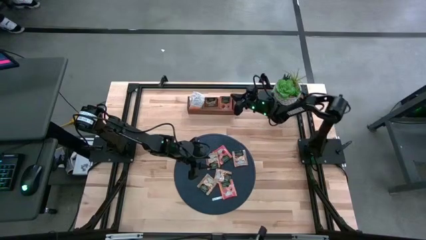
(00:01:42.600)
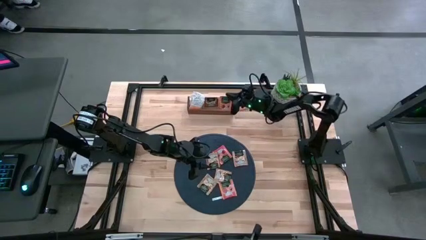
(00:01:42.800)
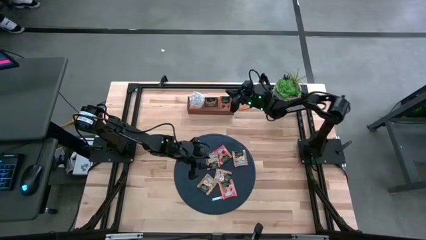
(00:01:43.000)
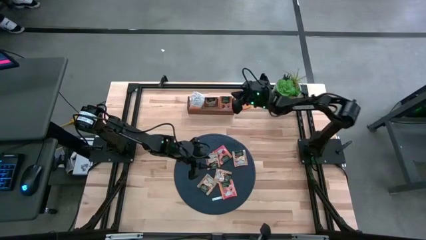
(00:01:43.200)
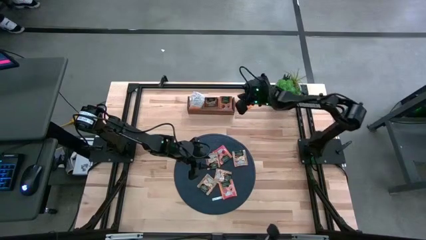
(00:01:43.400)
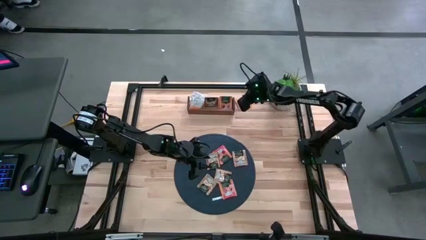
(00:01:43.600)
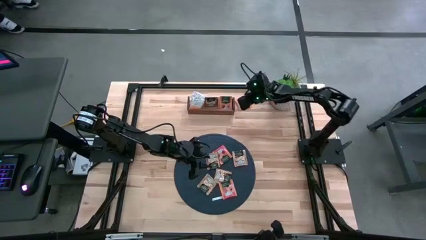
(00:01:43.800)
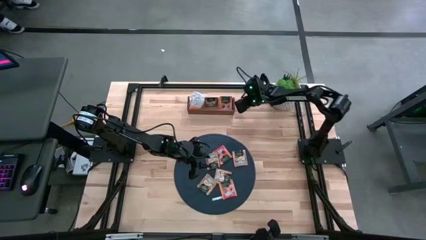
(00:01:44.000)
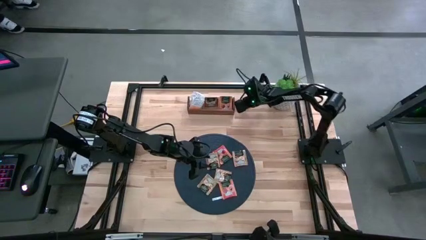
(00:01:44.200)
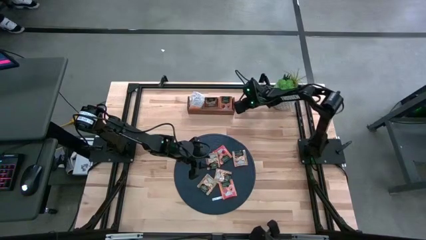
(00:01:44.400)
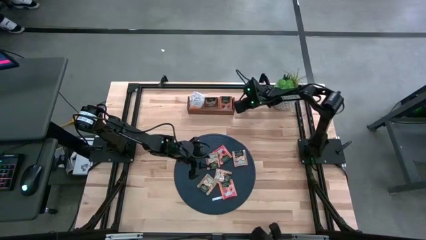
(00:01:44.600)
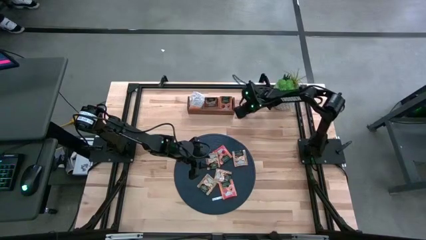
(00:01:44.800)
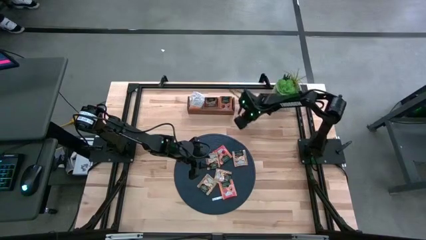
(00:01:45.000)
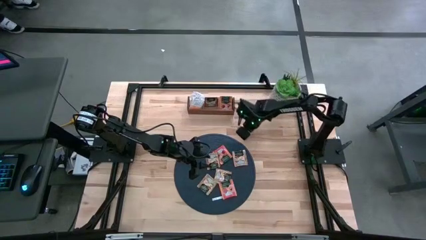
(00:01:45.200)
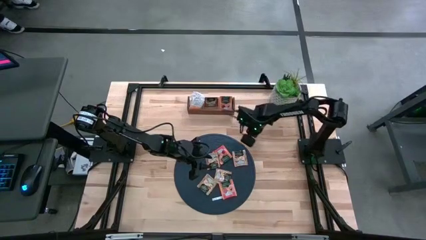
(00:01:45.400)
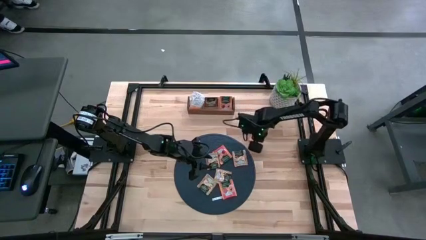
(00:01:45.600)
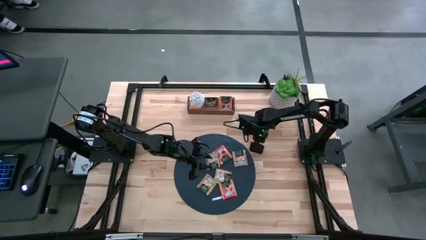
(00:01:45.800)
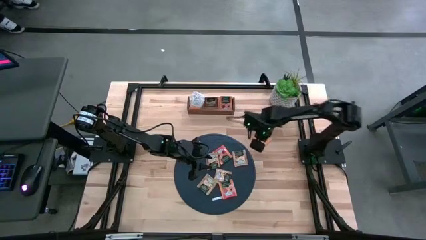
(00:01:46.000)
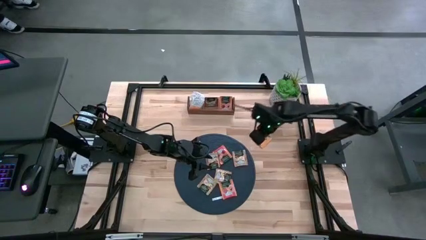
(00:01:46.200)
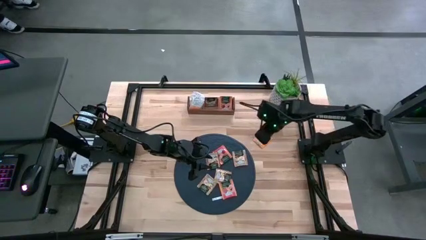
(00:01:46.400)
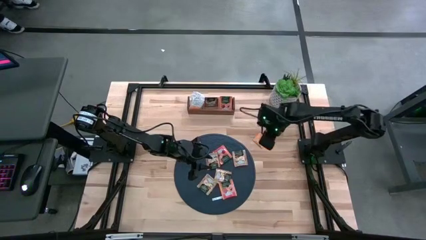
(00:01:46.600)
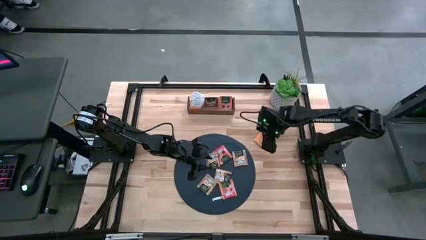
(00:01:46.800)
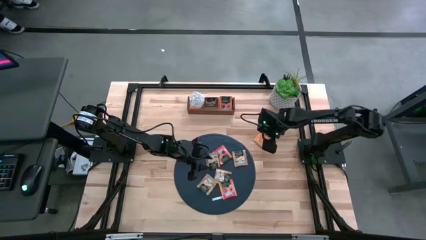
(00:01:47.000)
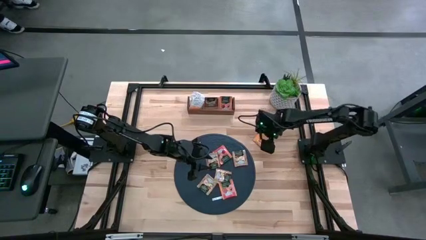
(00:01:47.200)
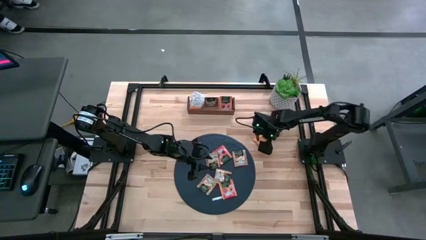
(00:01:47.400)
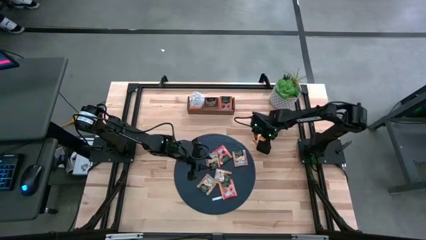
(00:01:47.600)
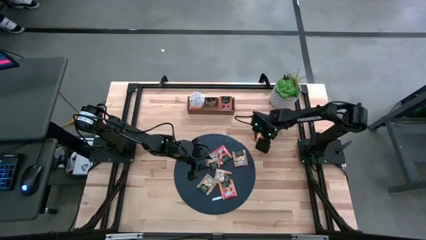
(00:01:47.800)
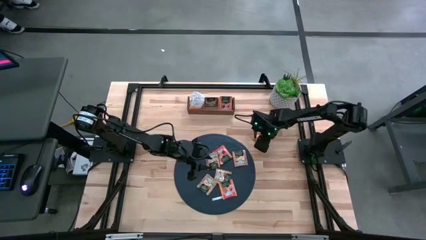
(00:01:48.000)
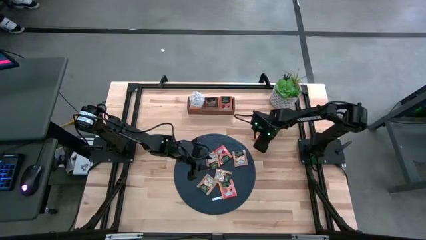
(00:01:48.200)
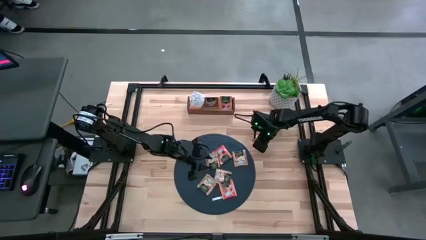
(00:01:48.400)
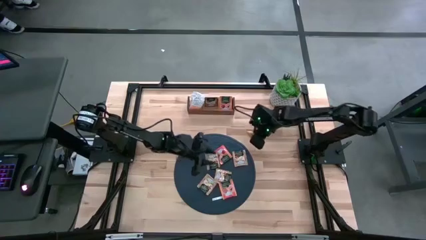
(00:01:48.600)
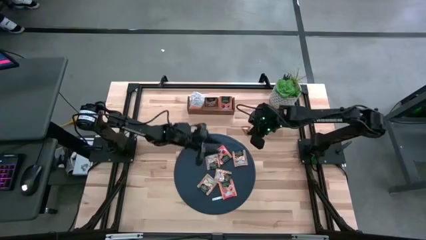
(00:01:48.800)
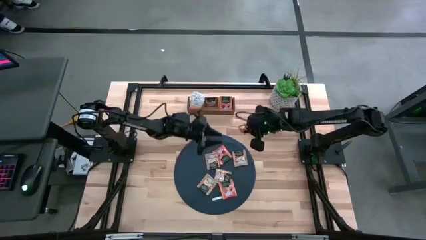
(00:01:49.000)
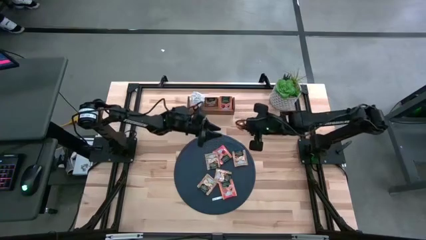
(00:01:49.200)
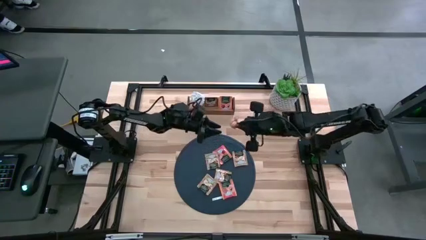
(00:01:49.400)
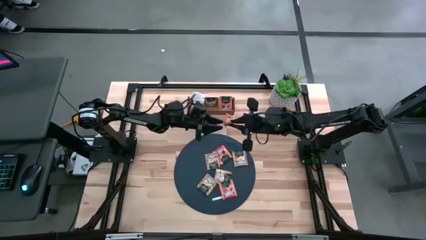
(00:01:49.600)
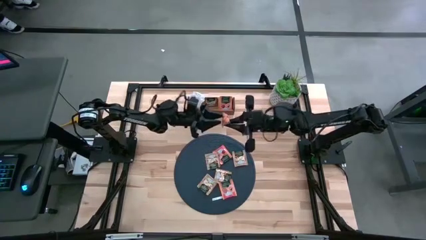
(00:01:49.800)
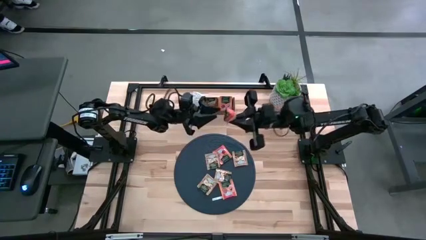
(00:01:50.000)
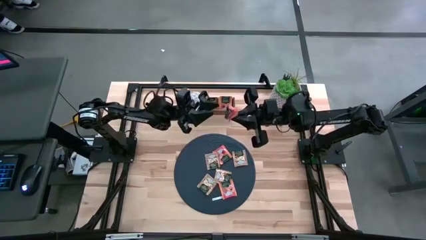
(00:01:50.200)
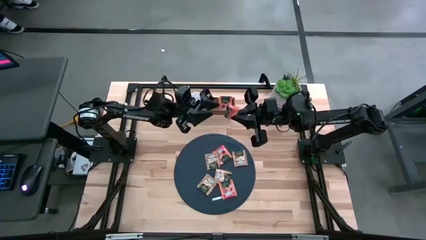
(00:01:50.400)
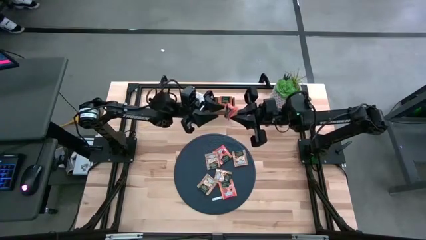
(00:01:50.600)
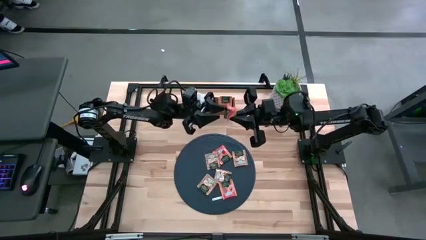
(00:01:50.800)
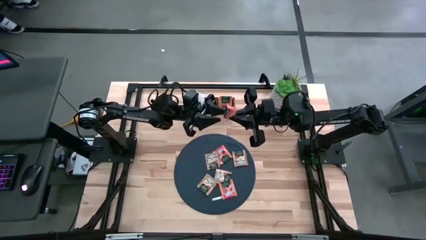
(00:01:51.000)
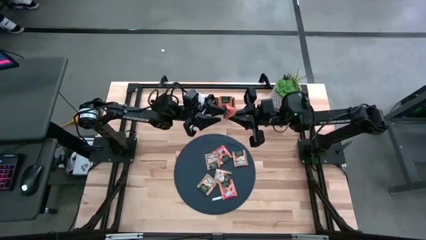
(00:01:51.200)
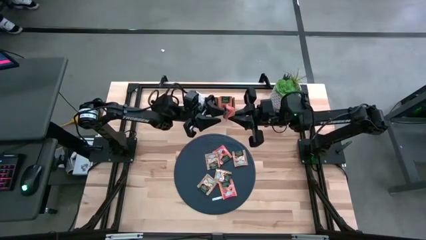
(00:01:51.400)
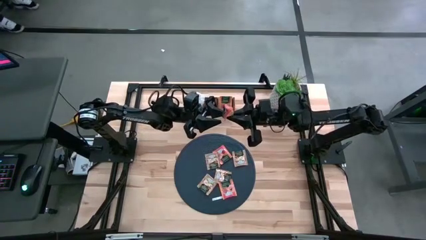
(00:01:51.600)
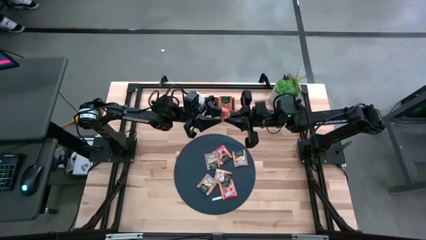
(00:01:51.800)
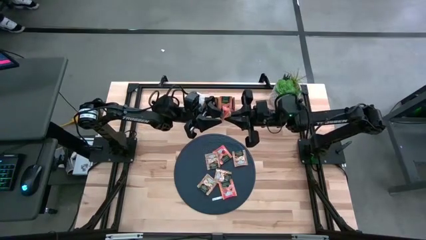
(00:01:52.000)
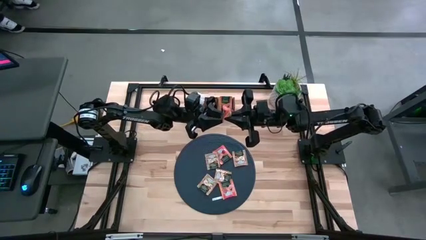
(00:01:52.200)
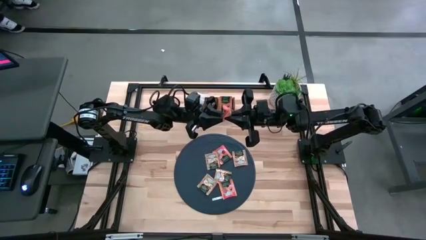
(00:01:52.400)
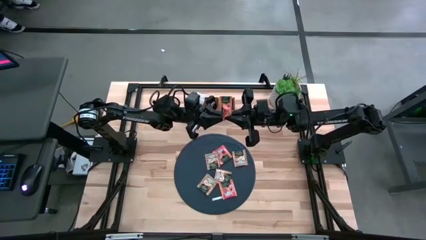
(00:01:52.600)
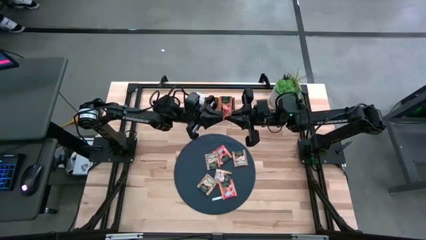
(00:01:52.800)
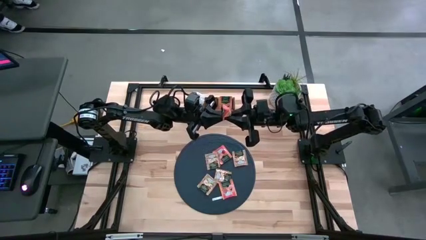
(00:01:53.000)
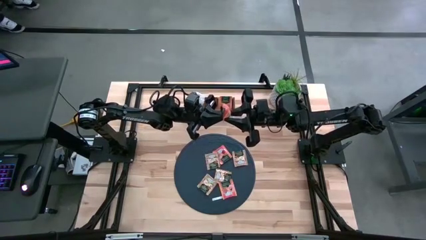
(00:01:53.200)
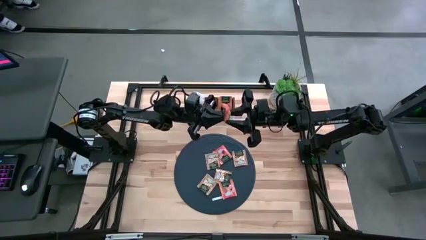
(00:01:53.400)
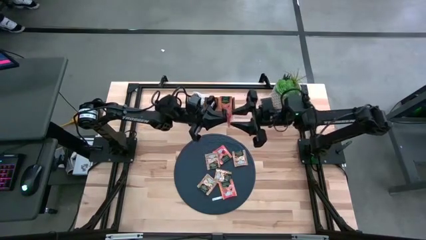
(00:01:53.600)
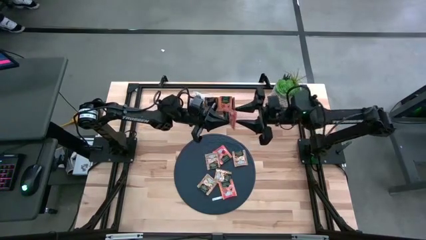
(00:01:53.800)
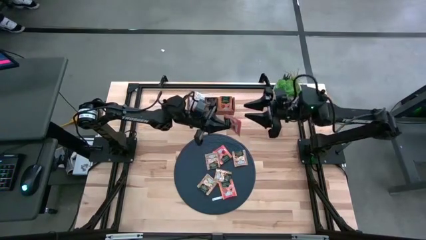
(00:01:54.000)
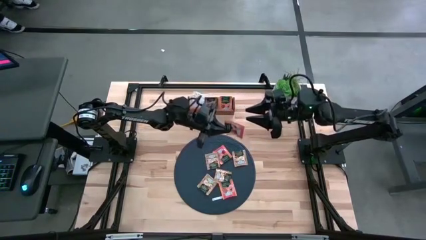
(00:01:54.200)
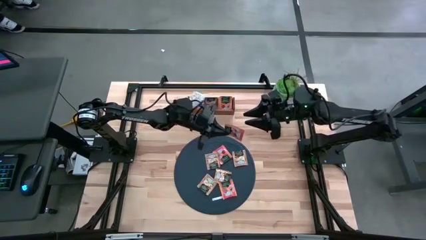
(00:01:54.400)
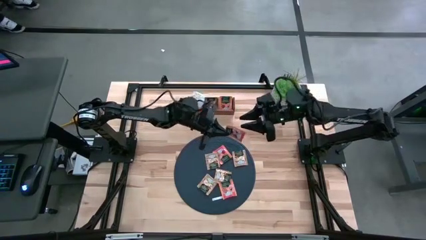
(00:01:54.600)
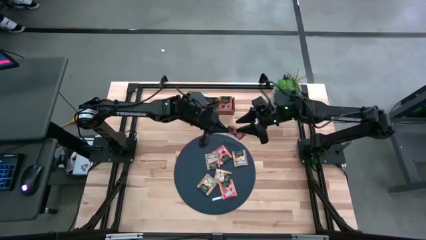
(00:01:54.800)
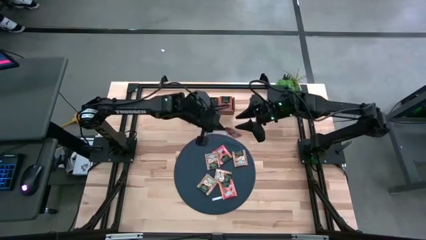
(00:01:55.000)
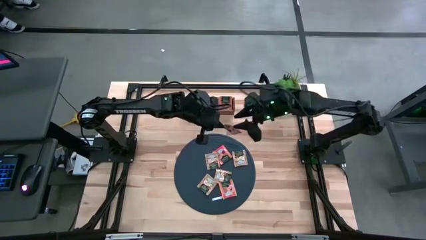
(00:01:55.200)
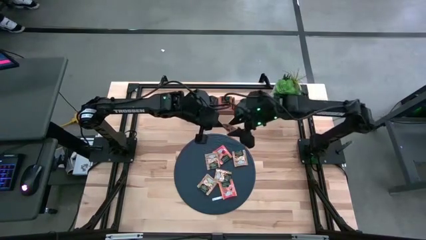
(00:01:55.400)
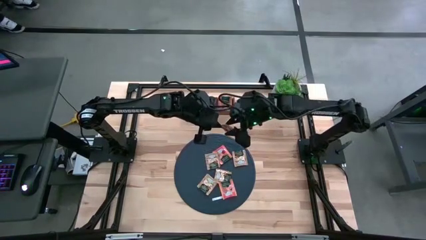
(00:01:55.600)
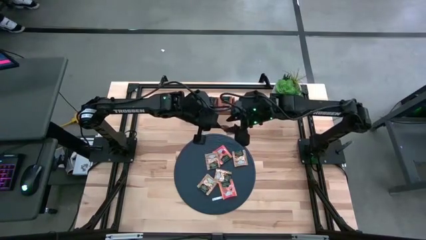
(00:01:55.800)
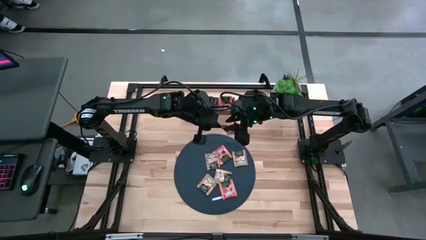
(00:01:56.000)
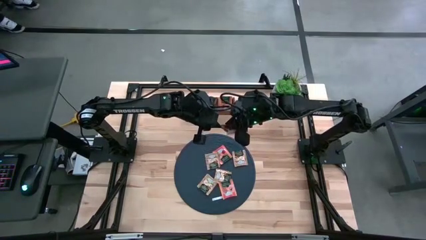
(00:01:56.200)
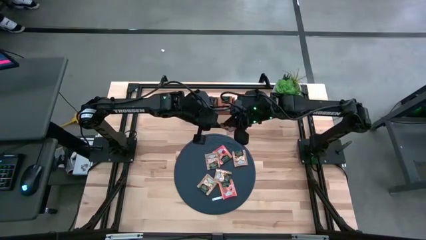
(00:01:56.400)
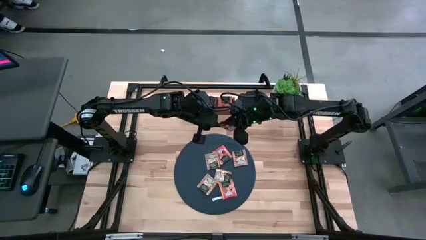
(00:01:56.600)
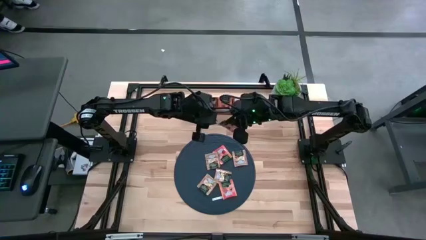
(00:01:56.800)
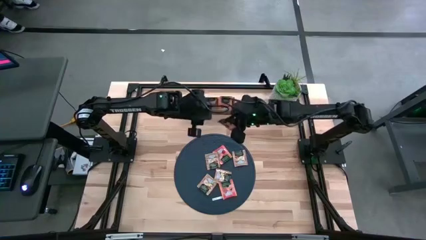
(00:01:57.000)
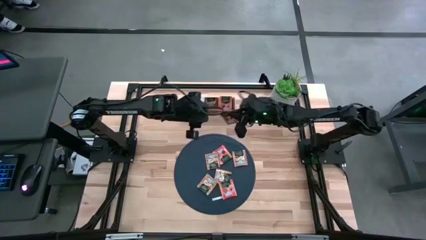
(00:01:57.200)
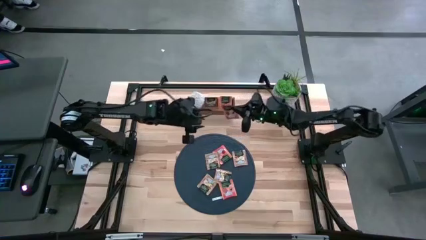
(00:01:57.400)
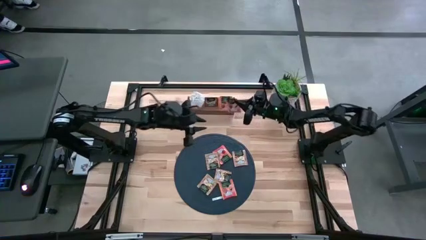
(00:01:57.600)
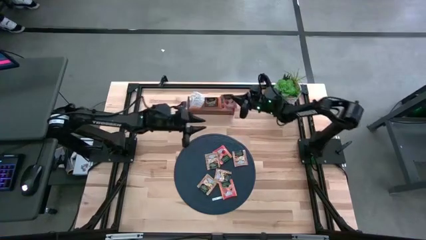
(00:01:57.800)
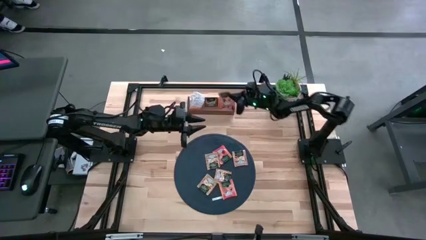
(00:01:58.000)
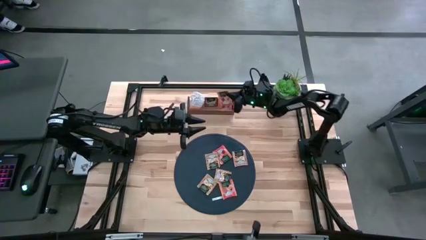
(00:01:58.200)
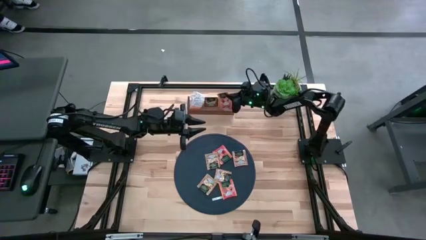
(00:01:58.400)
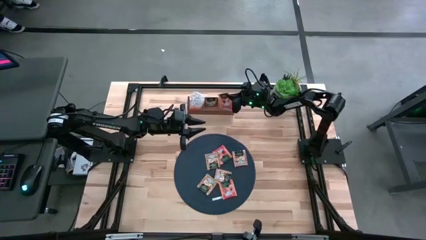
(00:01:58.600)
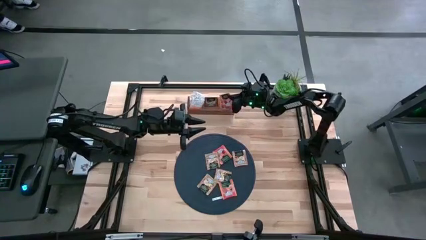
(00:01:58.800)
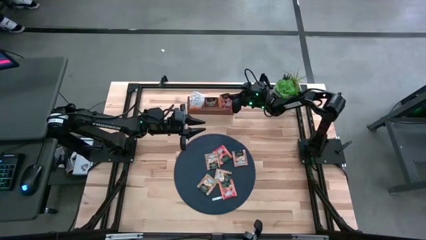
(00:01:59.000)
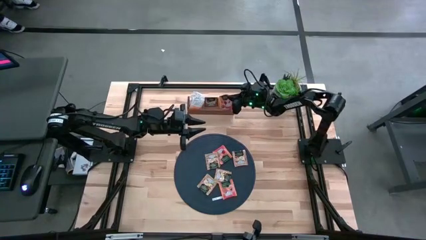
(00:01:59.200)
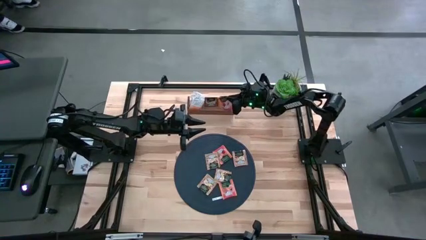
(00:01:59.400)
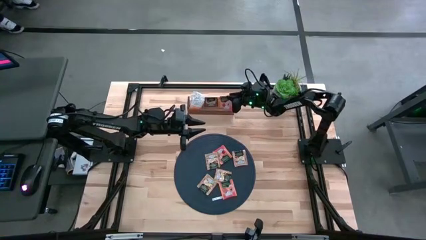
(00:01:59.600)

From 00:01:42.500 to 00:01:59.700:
Task: Pick & Place Tea
Put the orange tea bag into the right section of the wooden organizer
